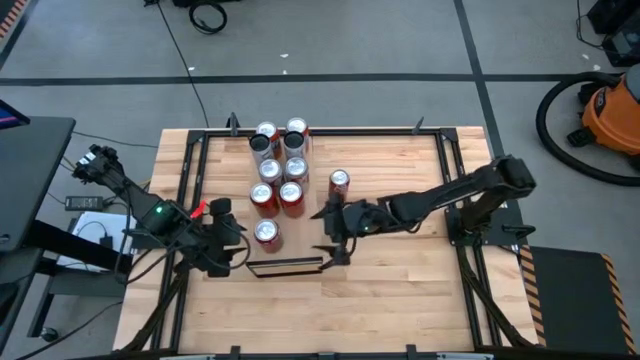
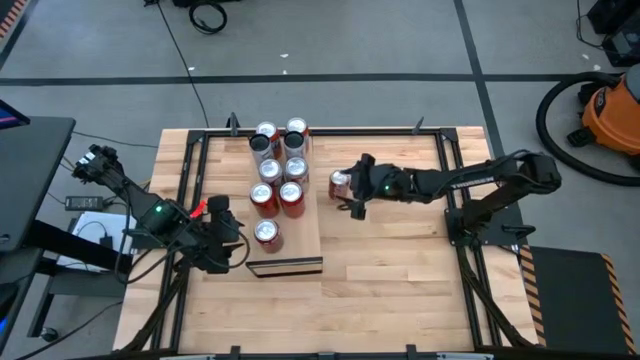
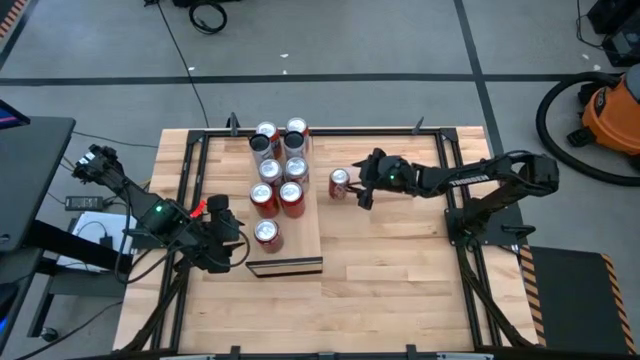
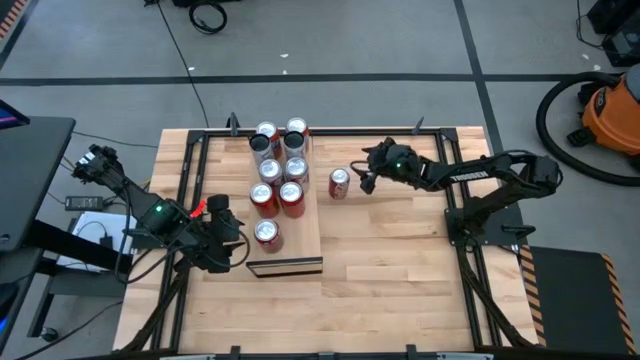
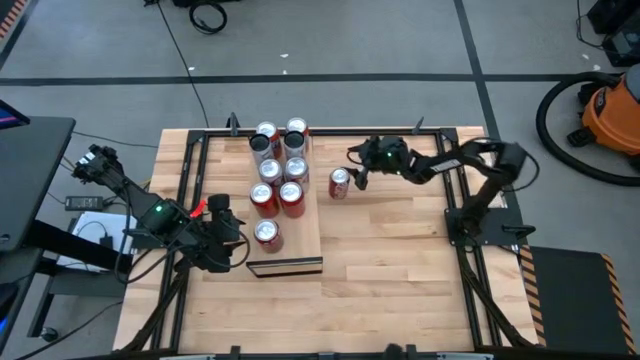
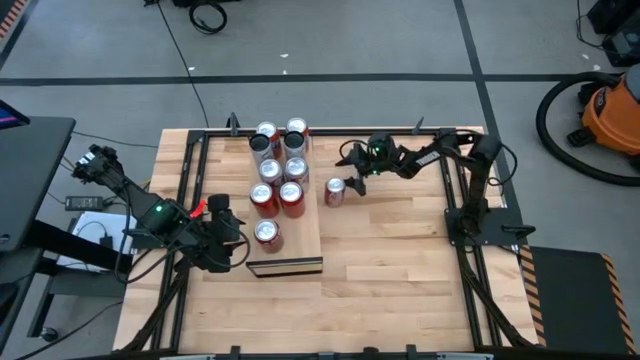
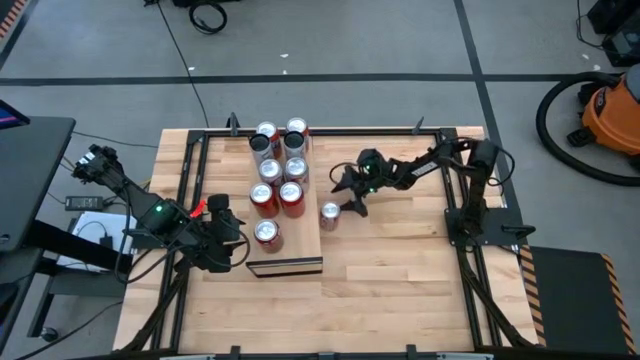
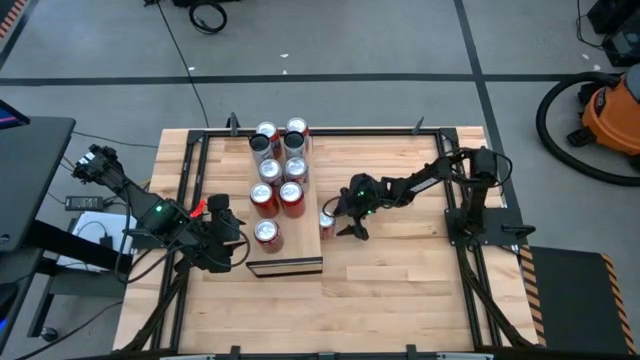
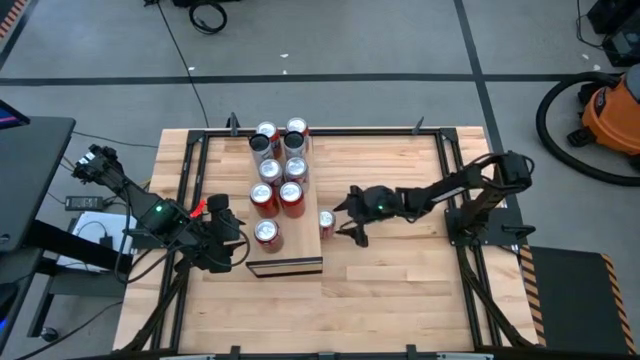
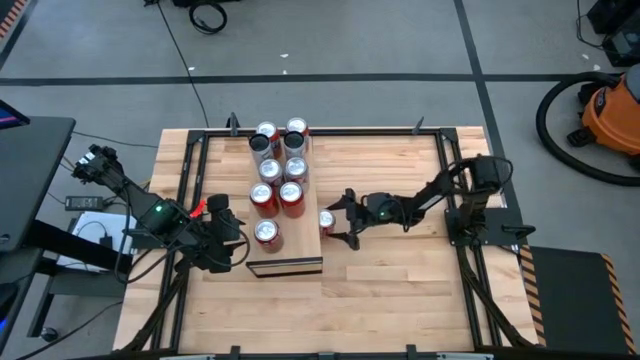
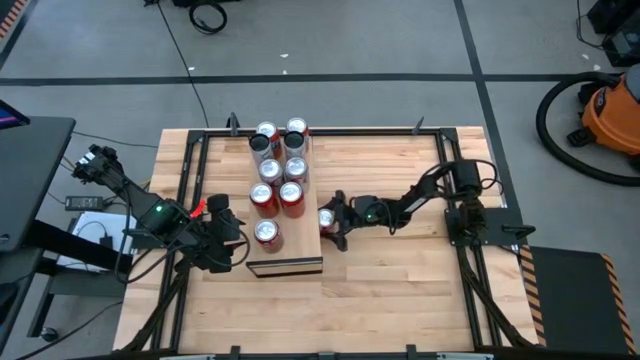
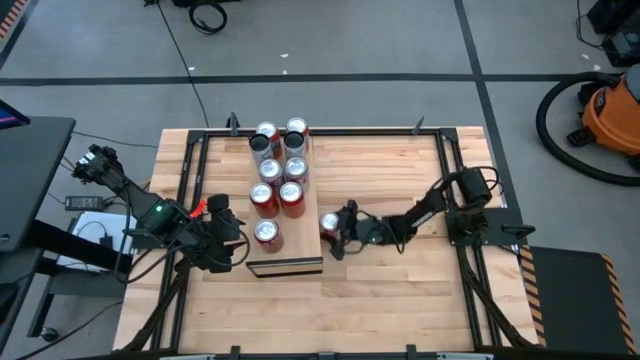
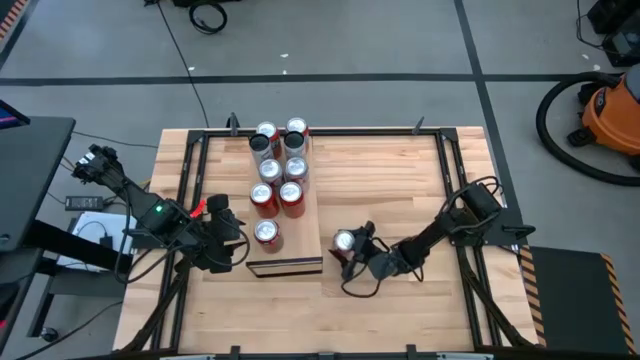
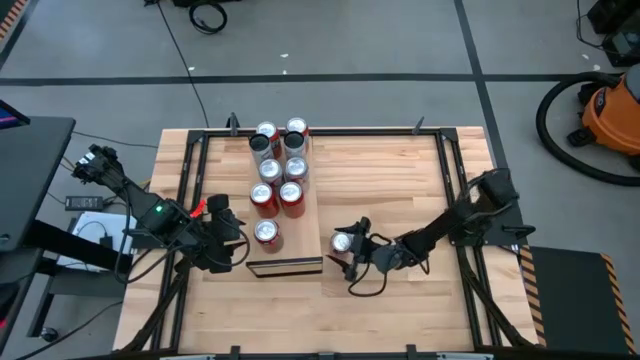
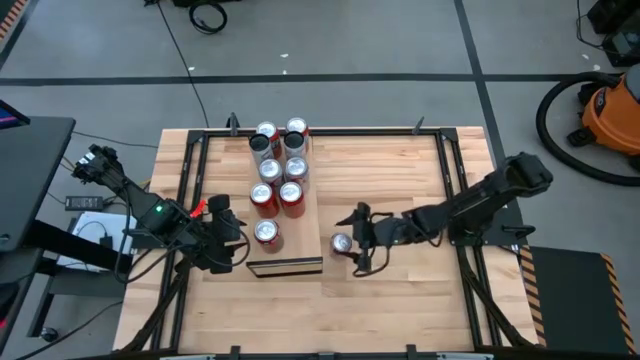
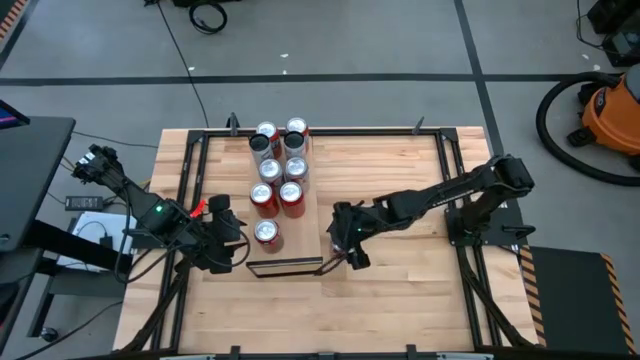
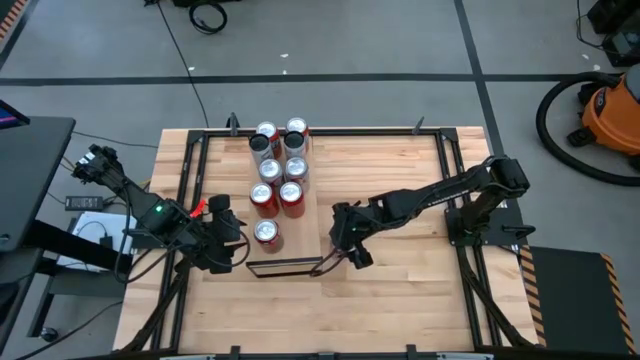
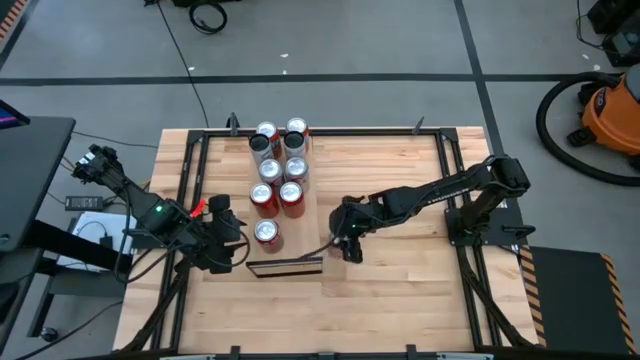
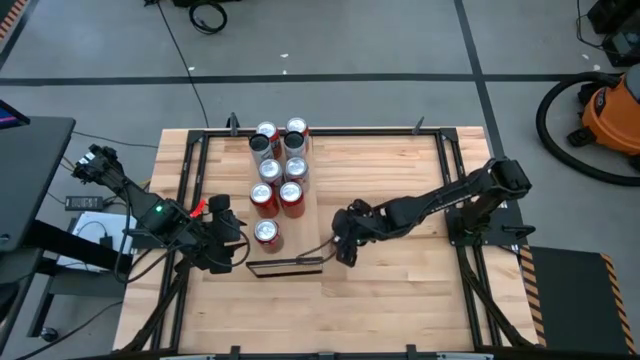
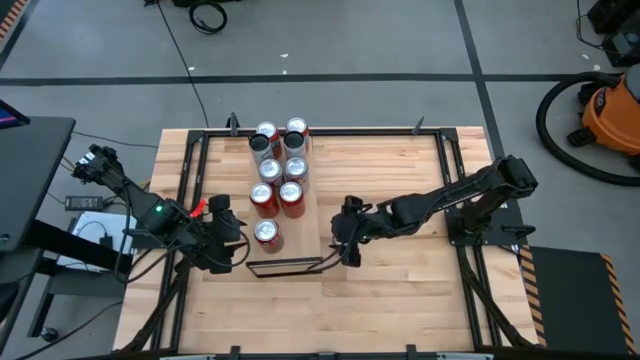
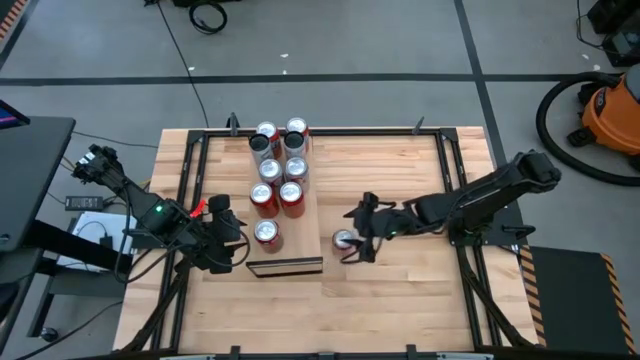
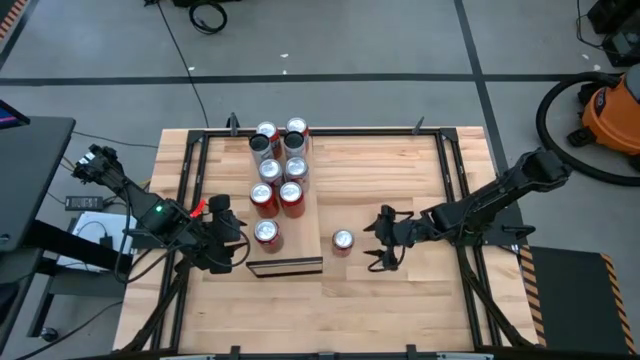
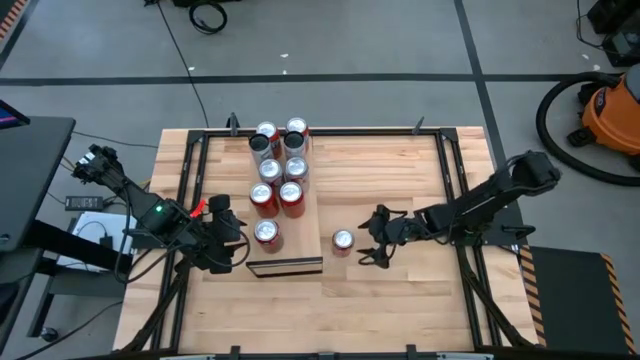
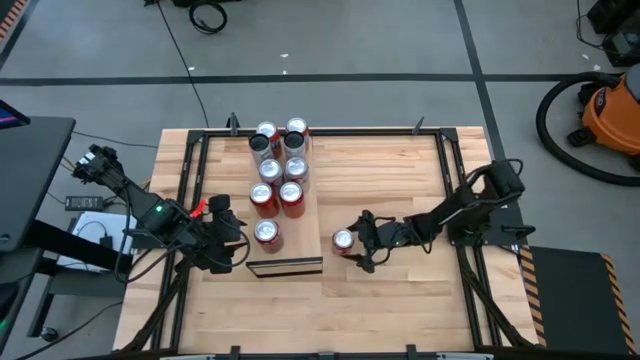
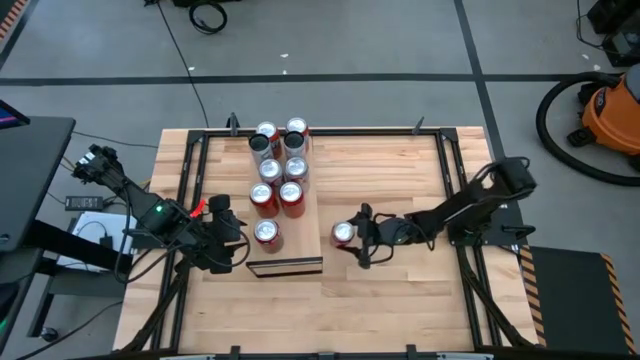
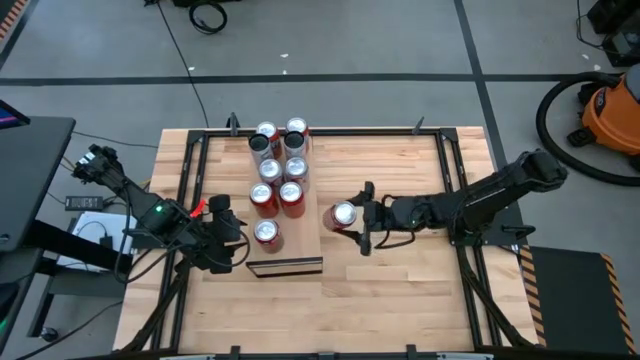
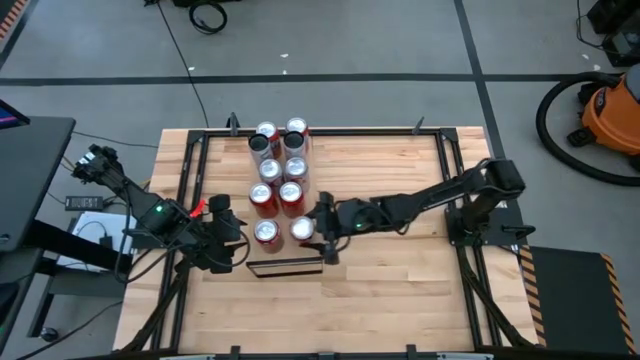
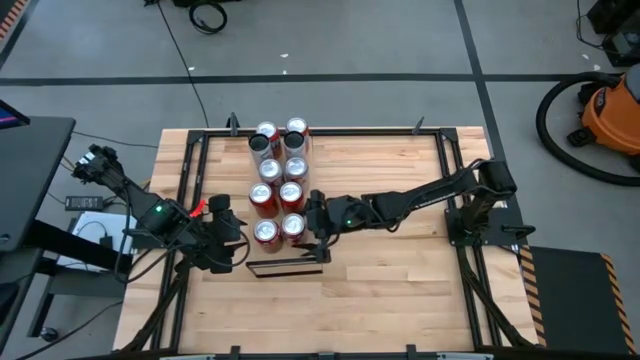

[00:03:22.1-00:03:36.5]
Task: Place canned beverage on shelf
Put the red-white soda can on the shelf and align it with the other red-white soda can

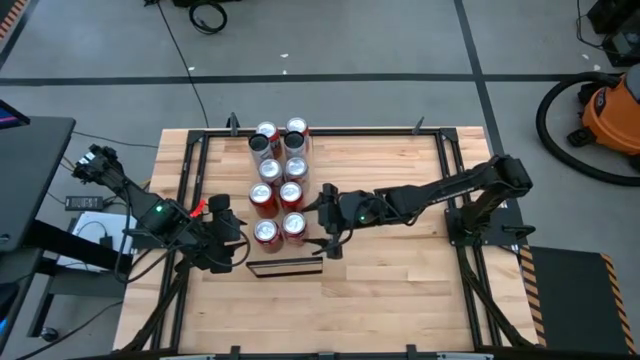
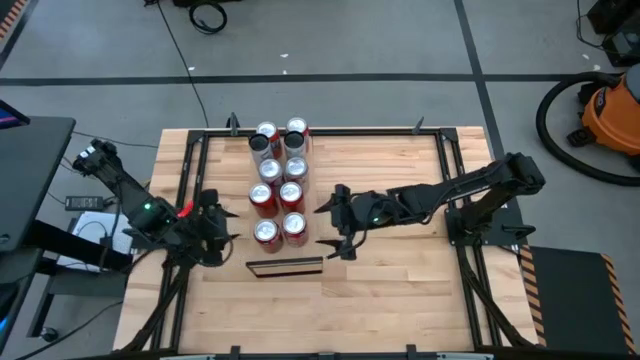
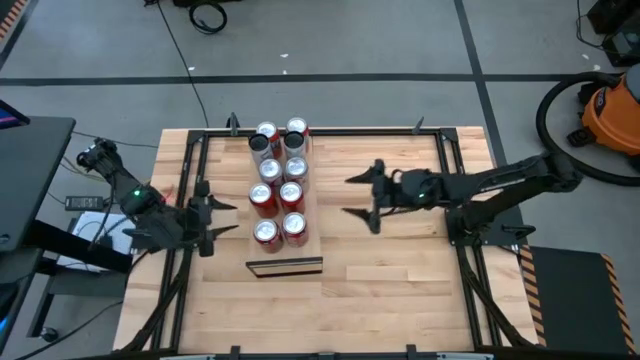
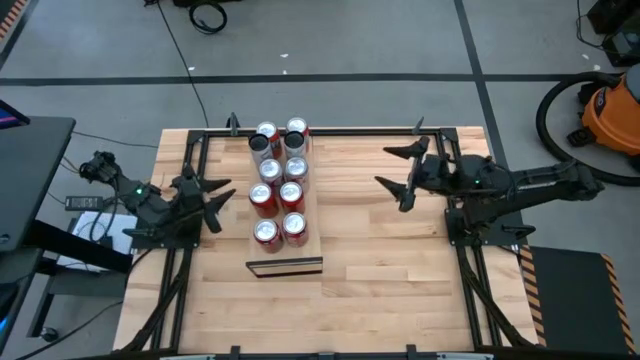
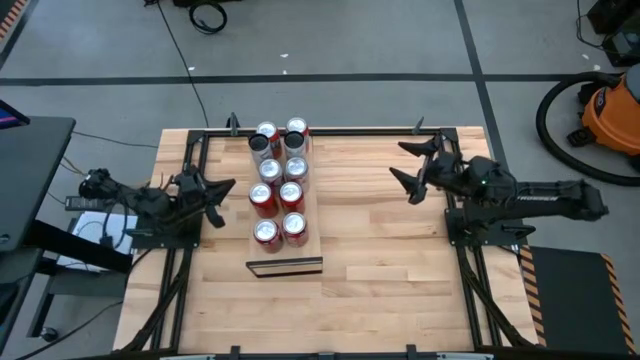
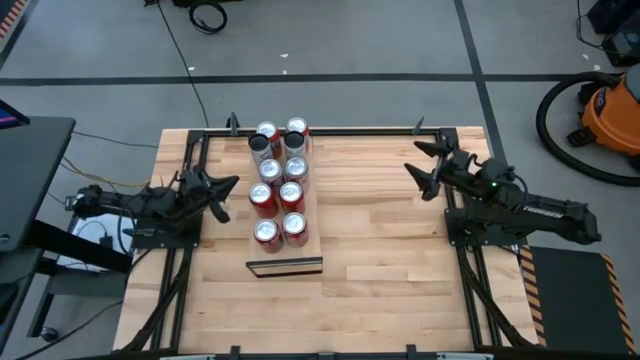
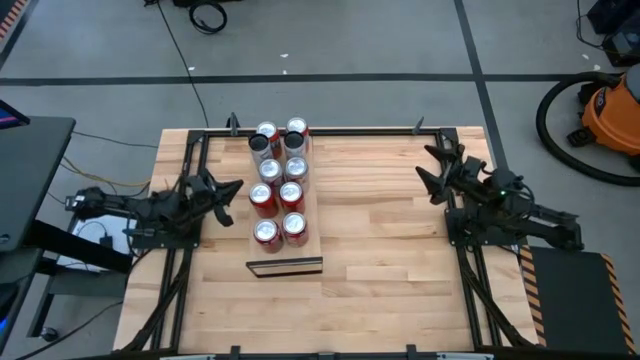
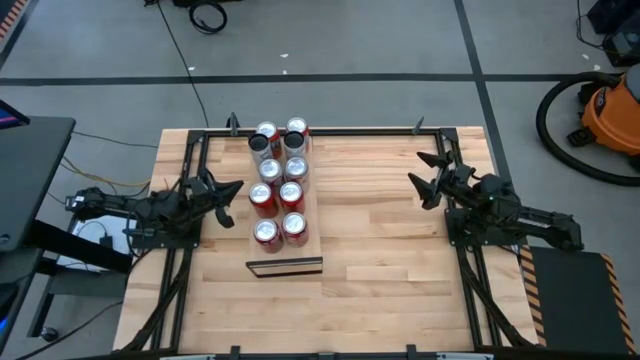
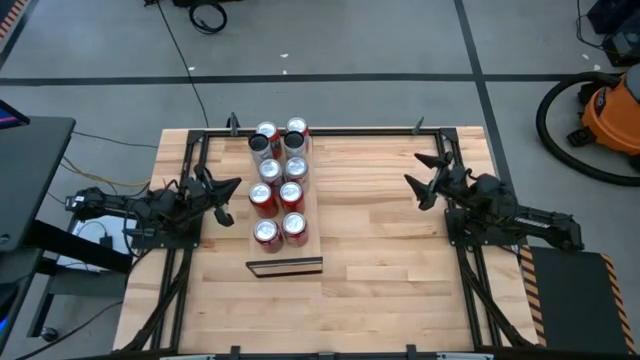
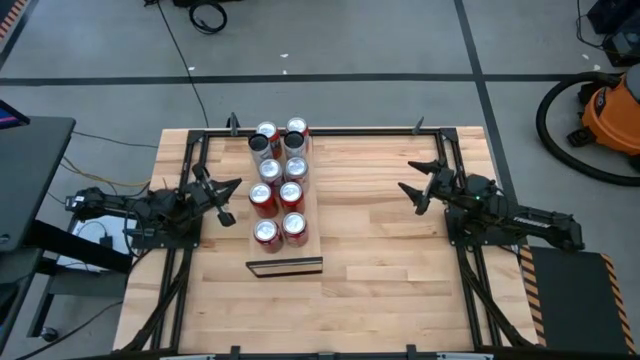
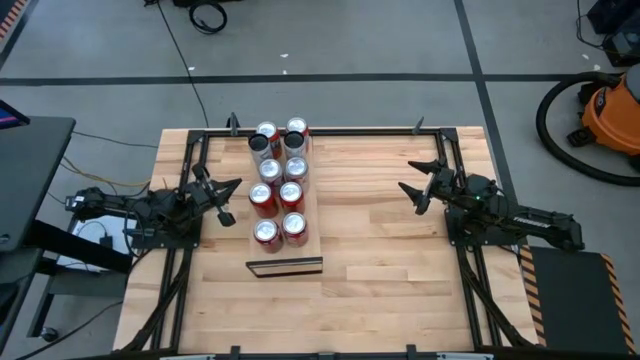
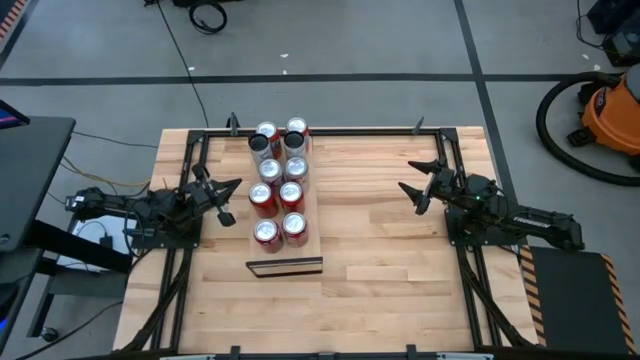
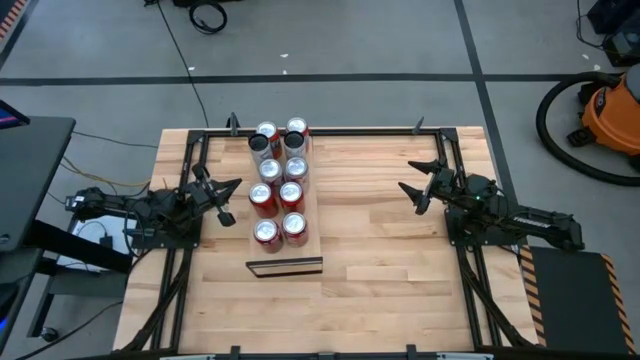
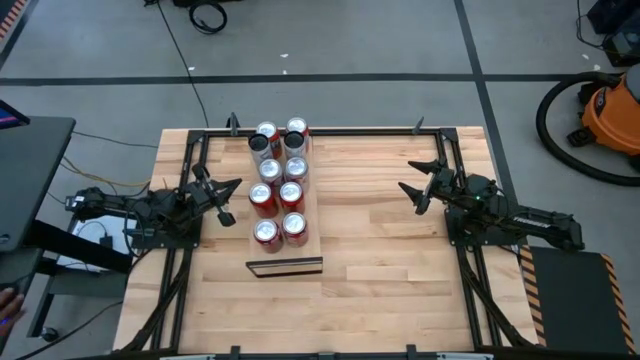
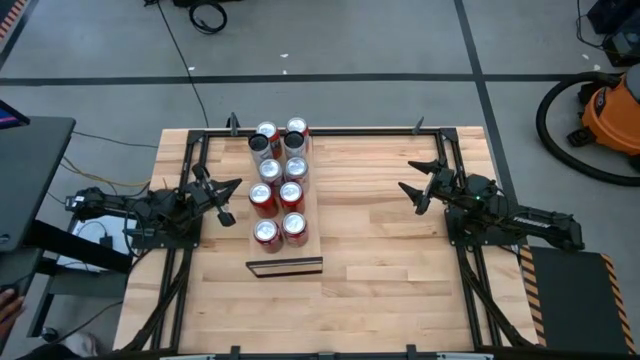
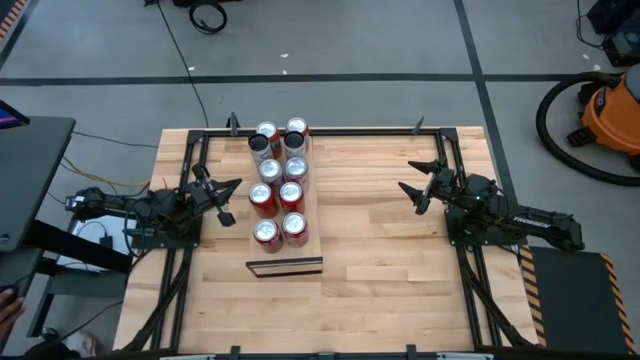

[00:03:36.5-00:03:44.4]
Return to Home Position
